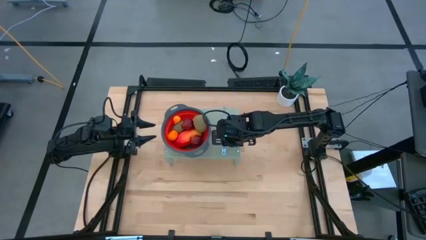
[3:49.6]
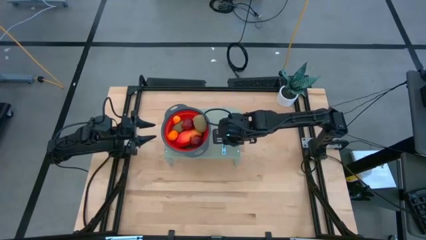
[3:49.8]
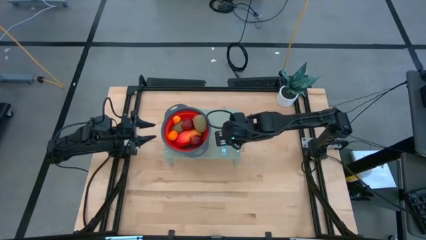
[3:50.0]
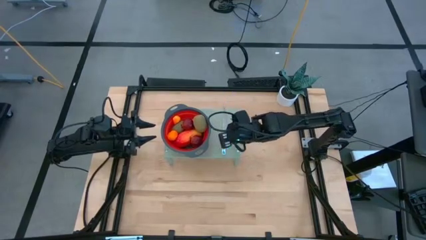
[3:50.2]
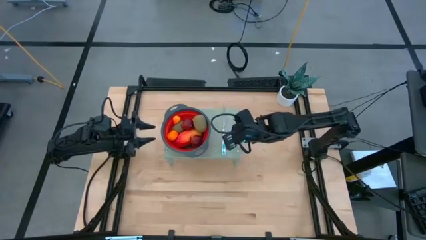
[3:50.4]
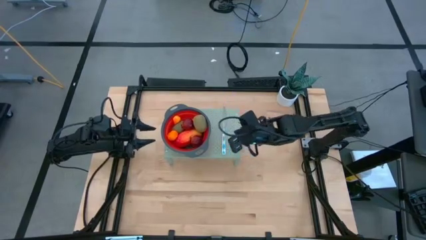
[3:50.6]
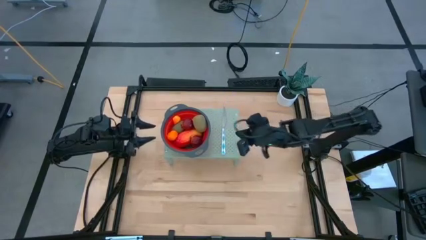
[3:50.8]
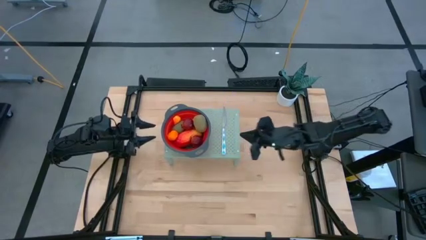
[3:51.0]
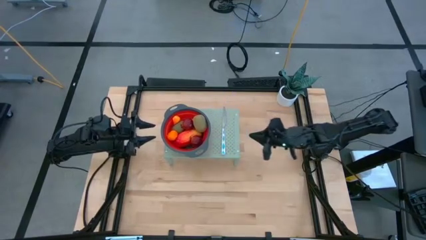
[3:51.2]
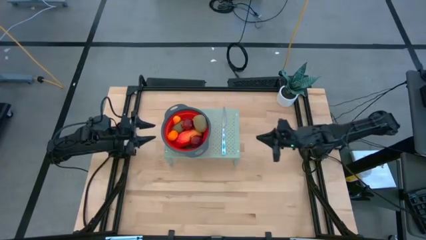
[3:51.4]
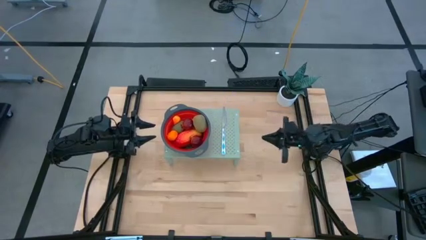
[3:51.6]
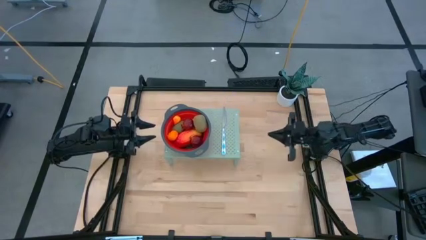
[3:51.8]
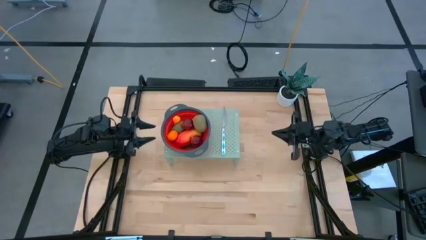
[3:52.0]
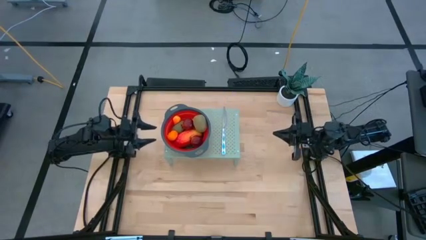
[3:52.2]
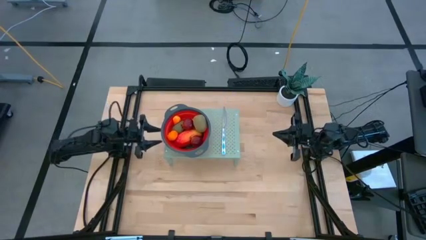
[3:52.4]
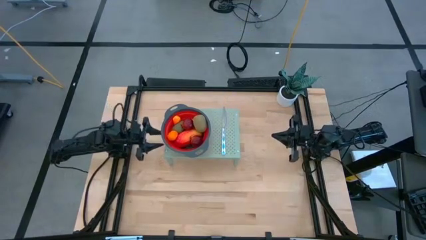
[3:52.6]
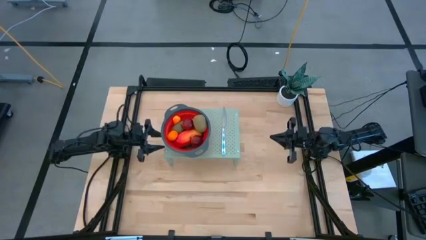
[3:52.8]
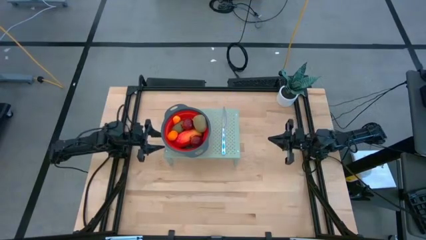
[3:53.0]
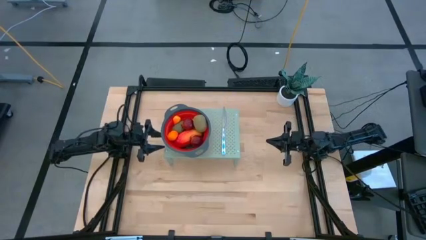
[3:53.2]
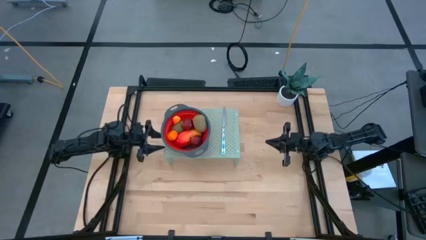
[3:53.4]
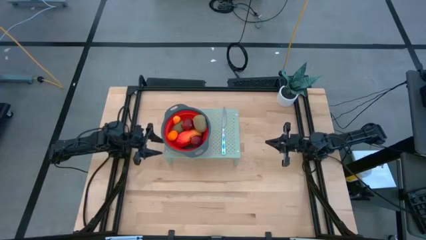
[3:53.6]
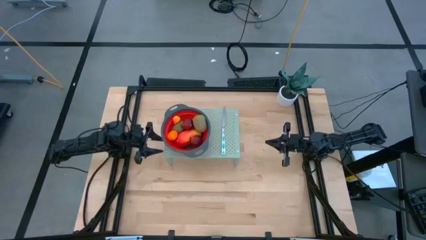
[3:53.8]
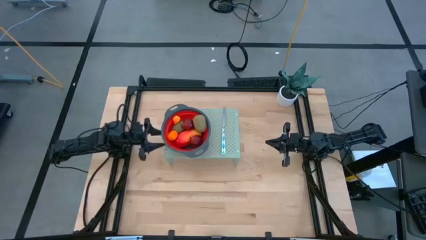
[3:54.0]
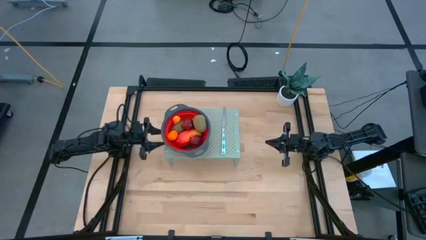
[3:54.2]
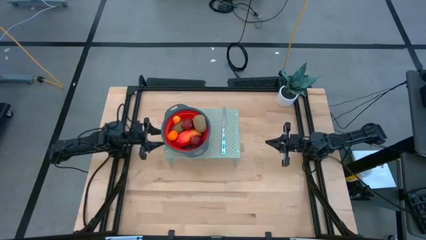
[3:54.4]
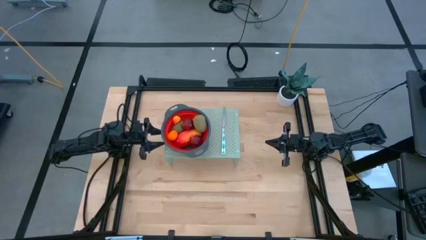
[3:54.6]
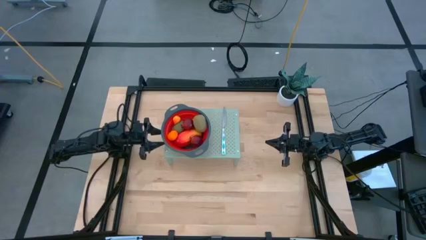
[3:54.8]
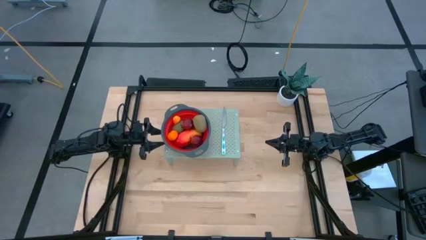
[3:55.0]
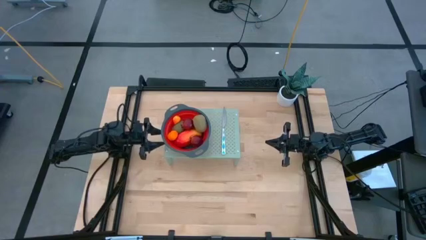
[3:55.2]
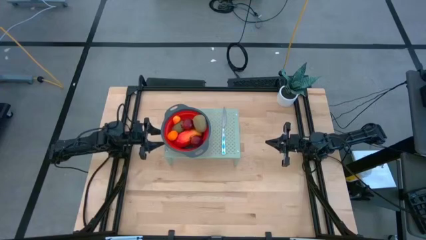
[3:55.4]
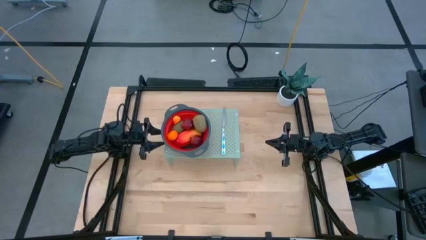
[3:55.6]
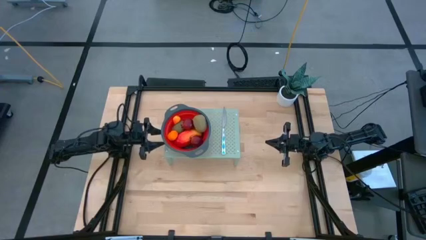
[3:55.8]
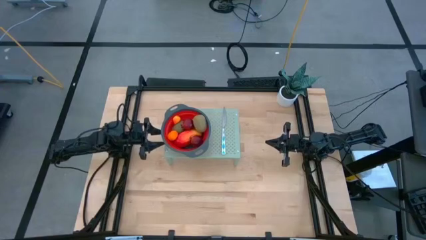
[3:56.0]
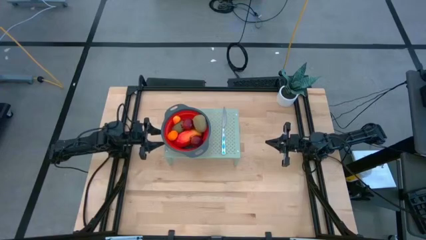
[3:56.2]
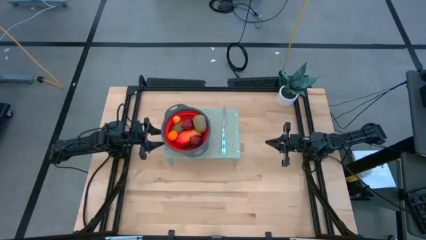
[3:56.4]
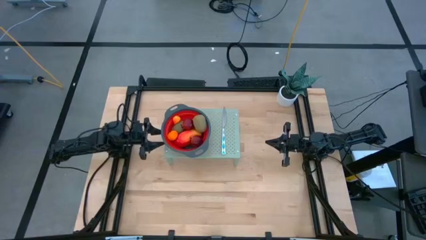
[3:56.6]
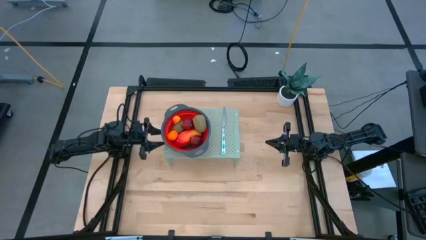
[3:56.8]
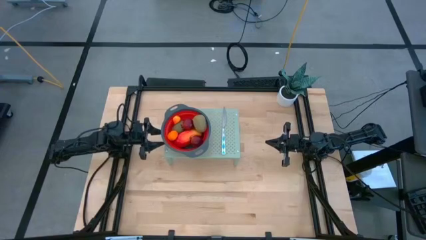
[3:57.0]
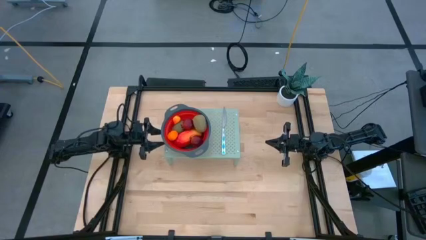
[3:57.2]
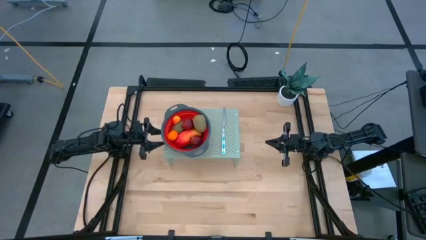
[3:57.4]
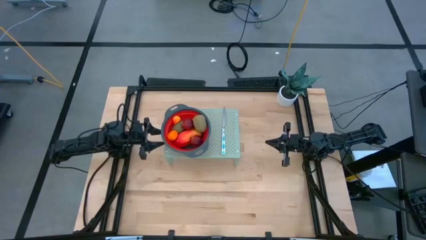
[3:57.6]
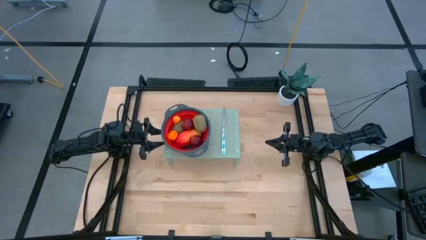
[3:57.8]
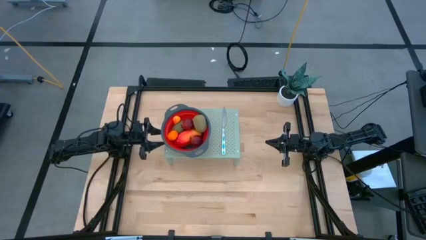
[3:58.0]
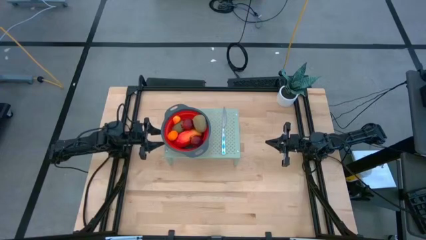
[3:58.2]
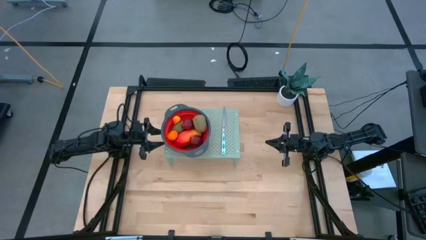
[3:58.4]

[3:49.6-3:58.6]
Task: Pick & Place Fruit
Return to Home Position

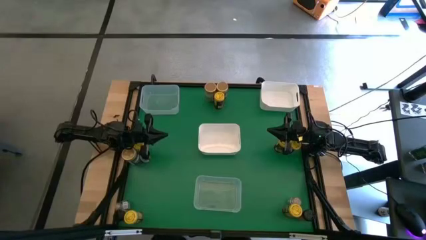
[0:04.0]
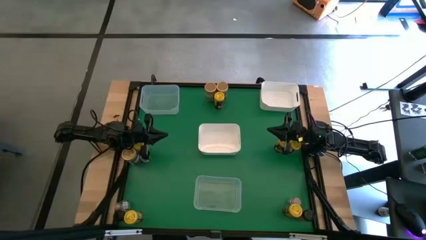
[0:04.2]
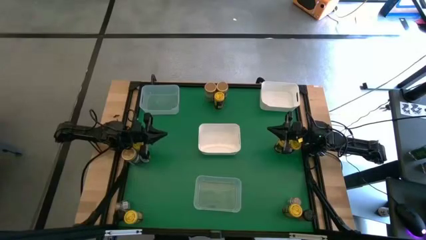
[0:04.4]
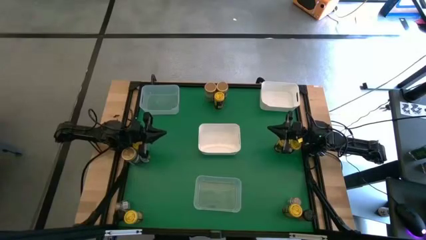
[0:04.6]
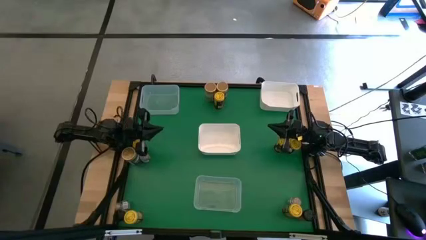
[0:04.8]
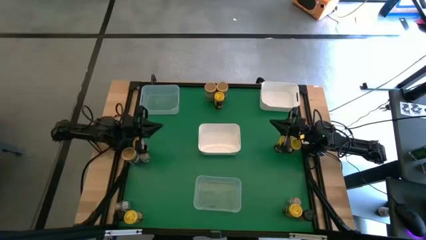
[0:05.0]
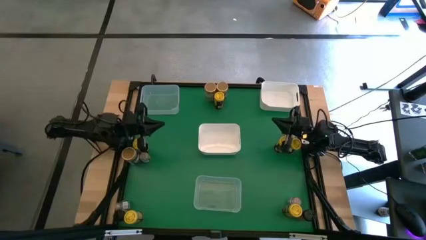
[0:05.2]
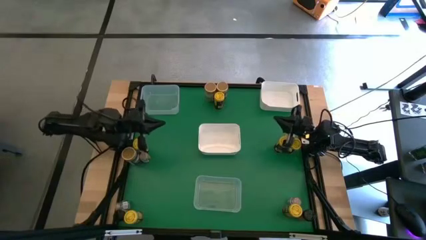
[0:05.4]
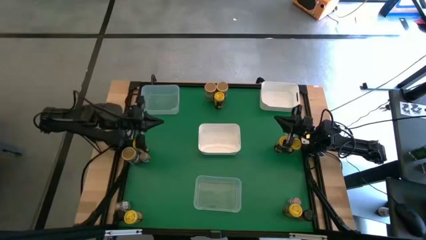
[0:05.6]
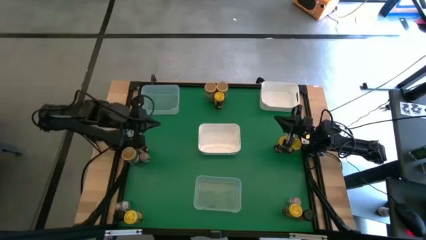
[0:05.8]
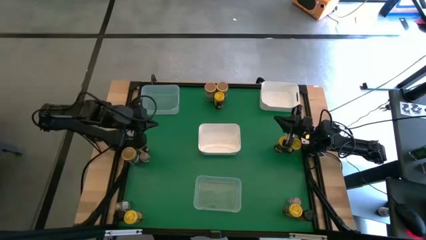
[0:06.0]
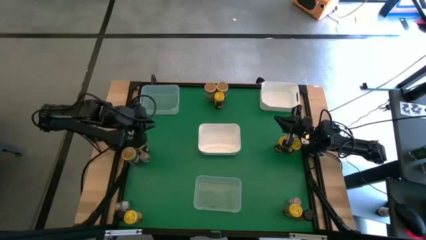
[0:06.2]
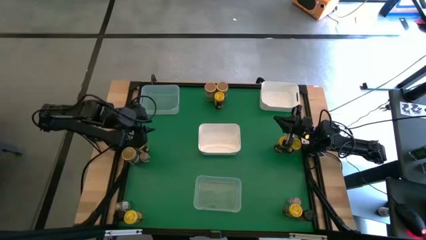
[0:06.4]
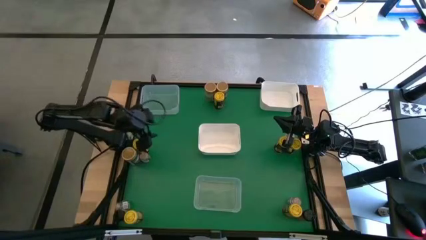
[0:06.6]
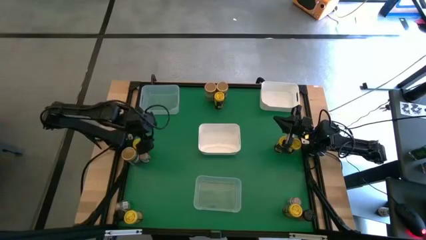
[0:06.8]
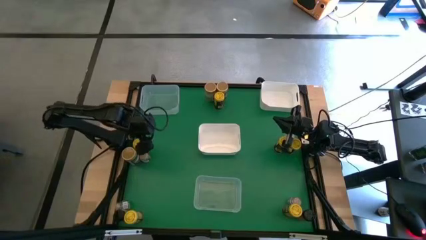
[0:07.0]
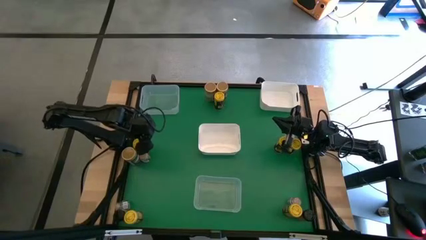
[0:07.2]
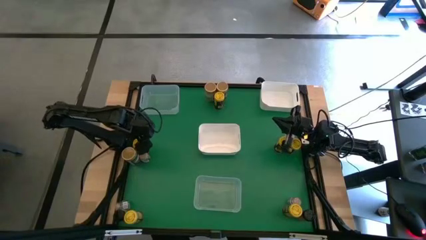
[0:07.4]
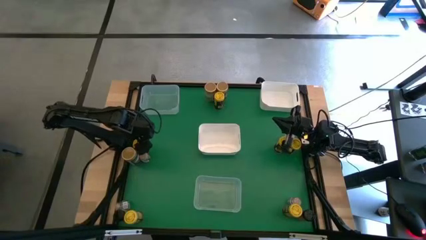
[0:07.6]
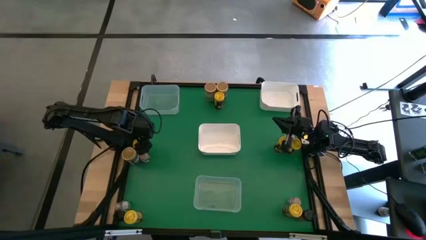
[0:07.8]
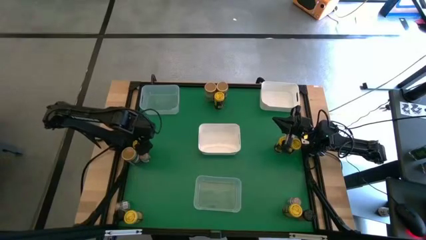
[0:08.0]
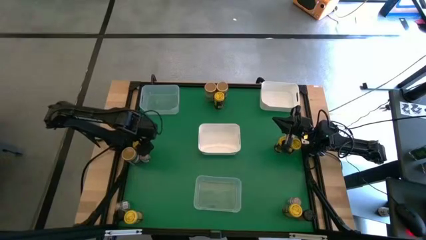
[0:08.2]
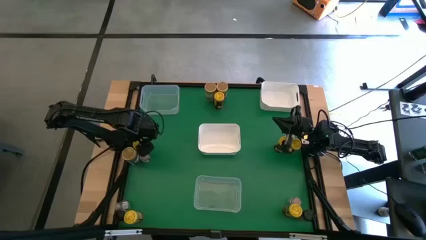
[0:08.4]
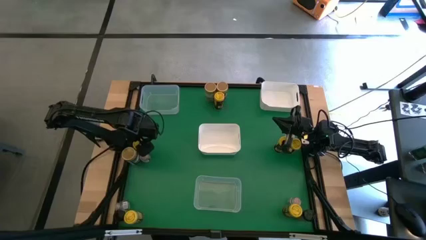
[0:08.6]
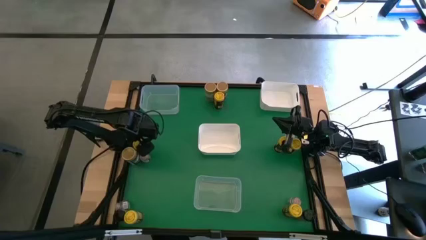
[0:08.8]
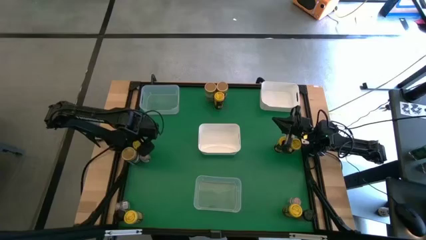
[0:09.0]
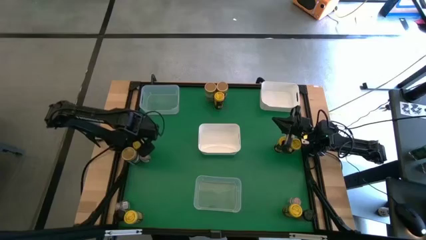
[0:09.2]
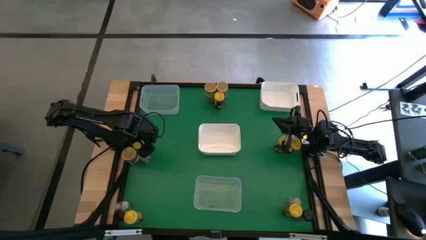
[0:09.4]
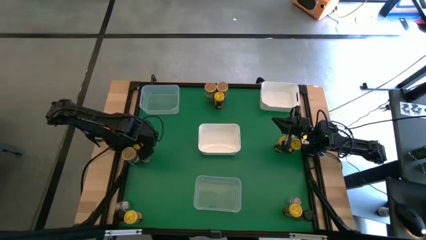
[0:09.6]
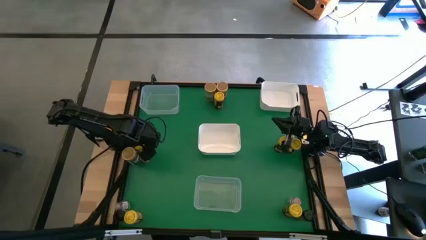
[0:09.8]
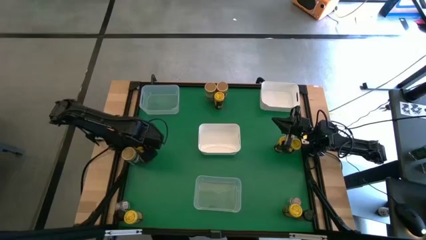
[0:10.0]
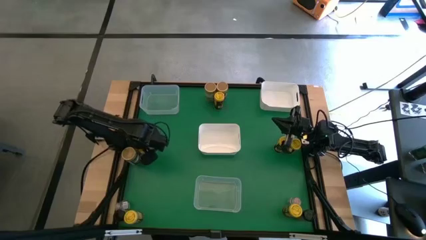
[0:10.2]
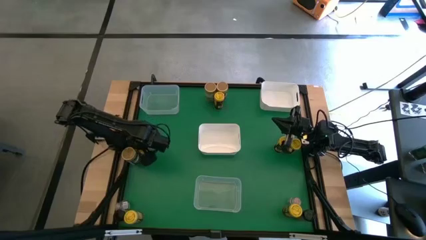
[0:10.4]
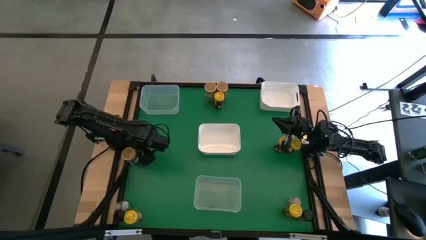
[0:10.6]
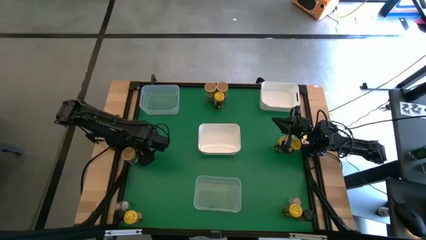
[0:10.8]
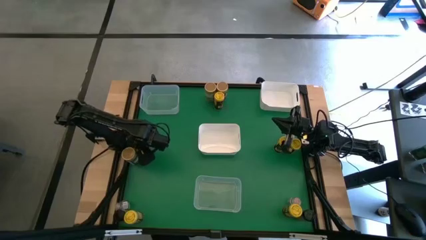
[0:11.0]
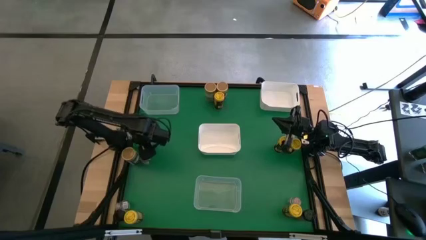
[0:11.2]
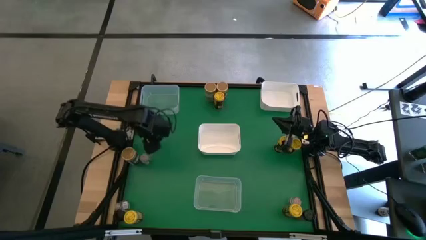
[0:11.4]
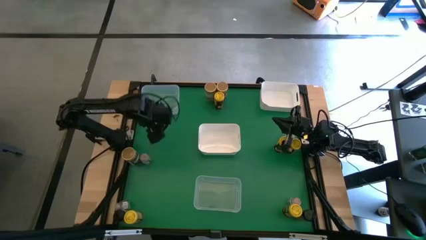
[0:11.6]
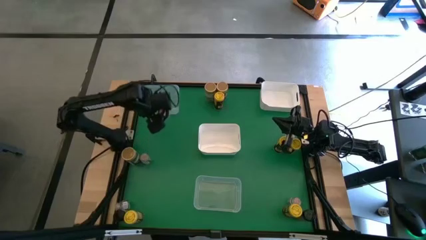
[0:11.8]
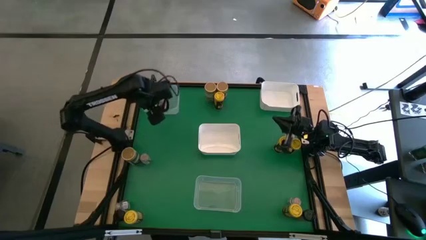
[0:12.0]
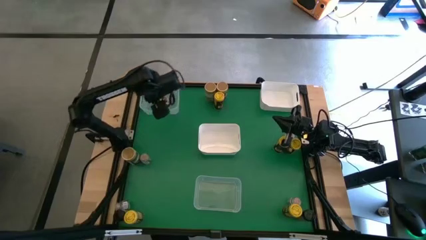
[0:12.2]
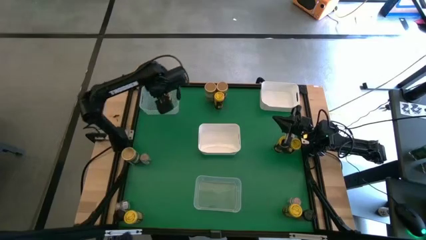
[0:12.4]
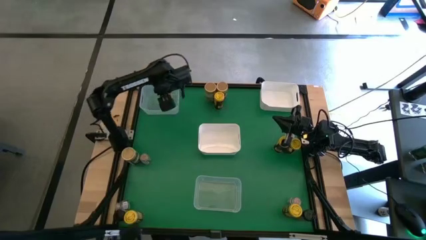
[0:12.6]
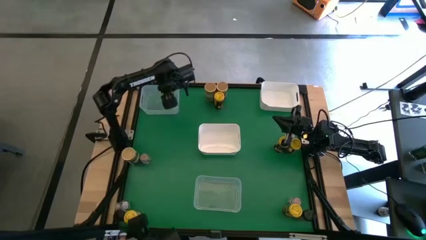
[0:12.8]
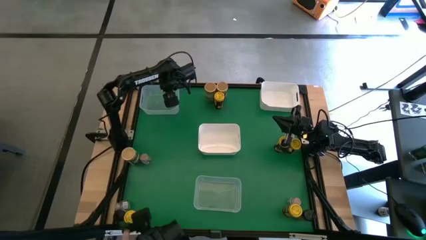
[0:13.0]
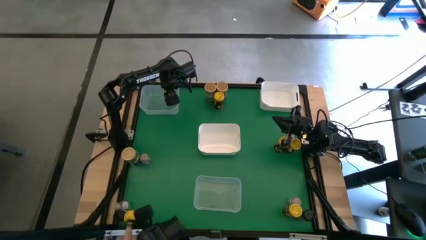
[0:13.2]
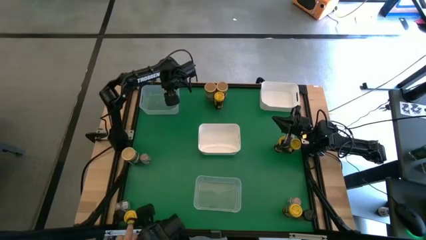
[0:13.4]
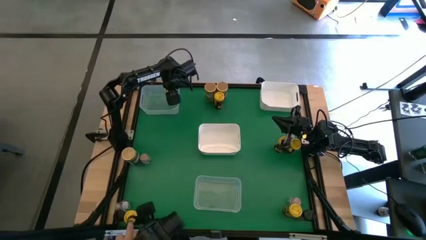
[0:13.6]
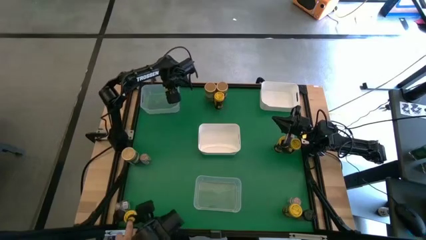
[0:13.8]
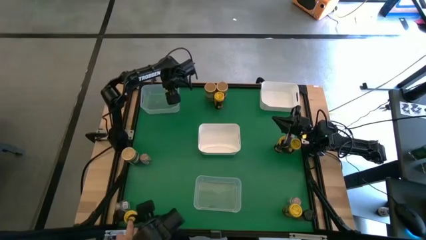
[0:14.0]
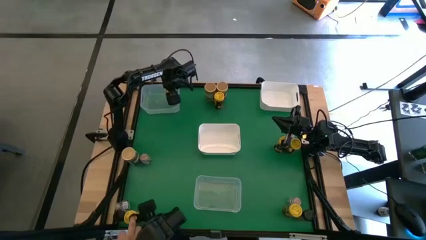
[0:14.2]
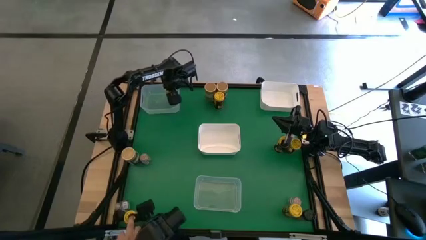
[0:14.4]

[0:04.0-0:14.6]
Task: Sort spices by type
Put the middle left yellow seasoning bottle into the top transparent bin
